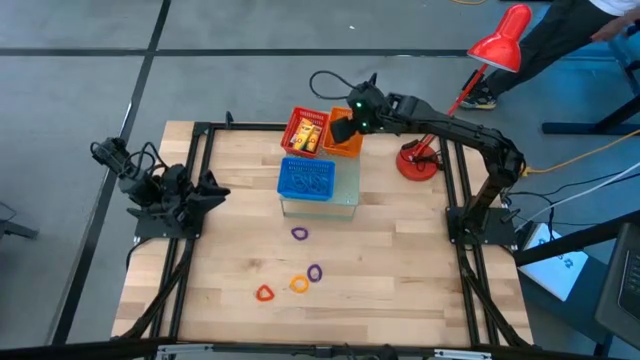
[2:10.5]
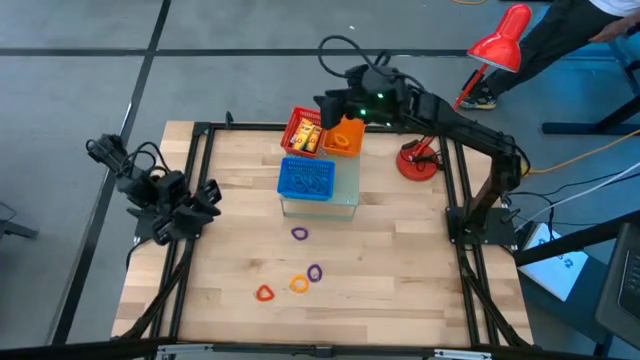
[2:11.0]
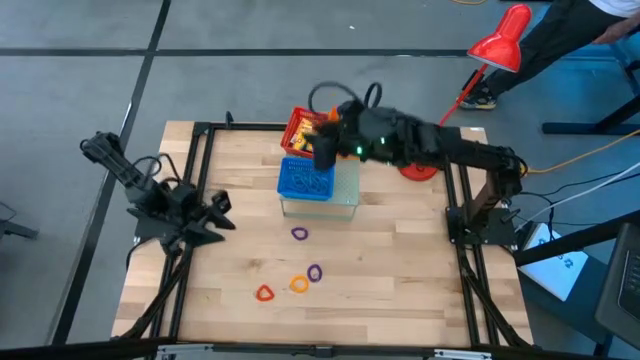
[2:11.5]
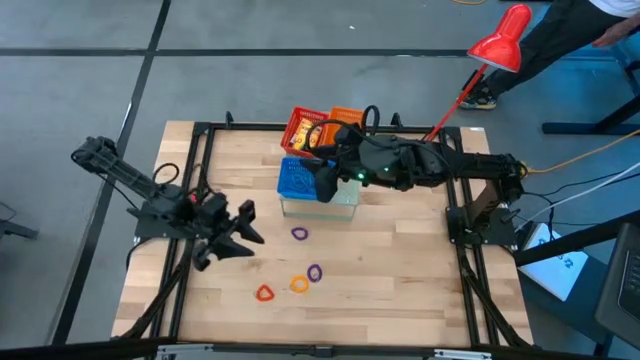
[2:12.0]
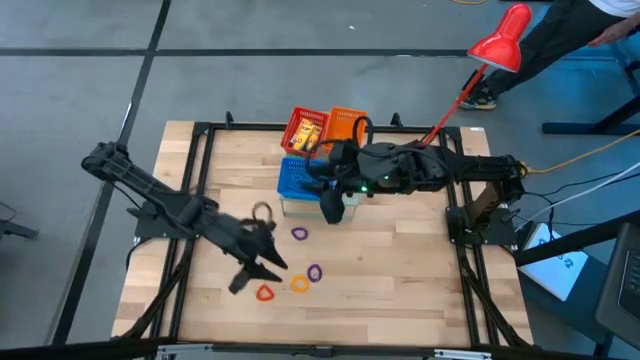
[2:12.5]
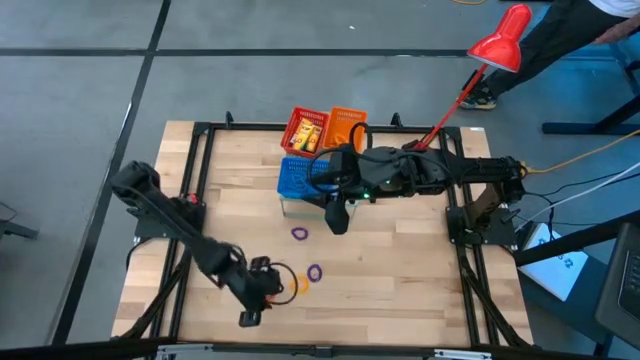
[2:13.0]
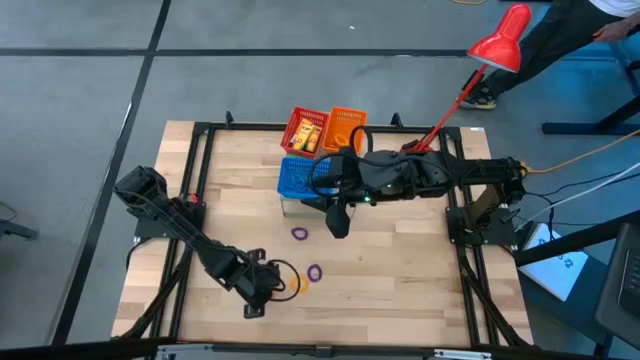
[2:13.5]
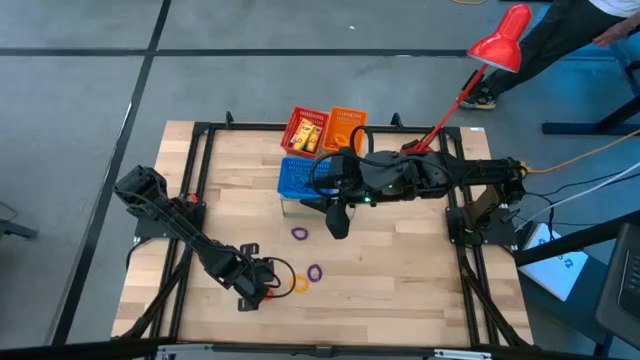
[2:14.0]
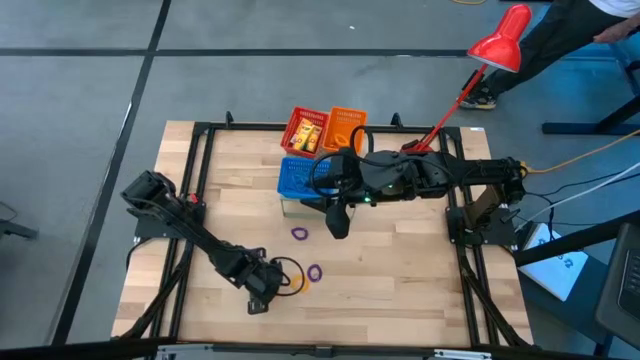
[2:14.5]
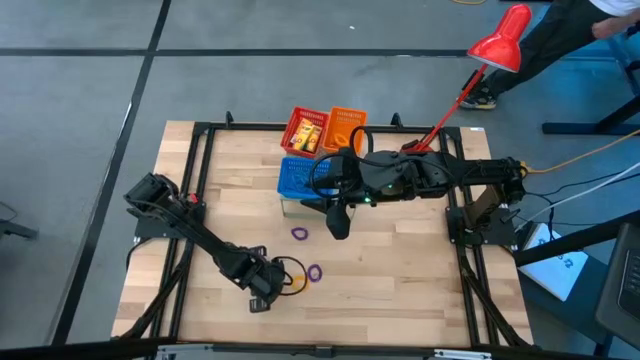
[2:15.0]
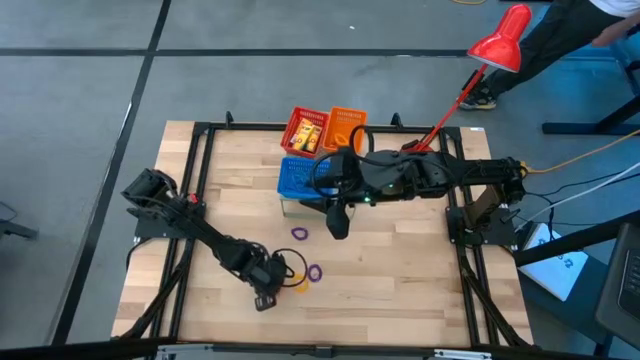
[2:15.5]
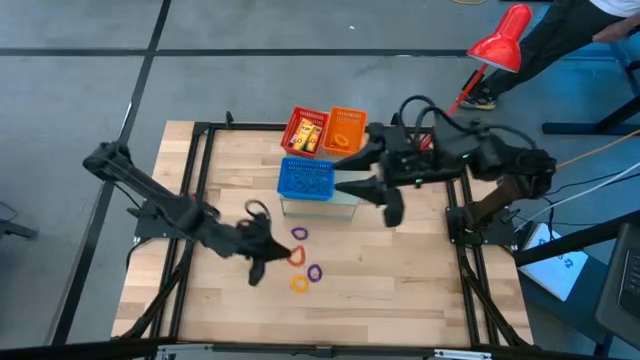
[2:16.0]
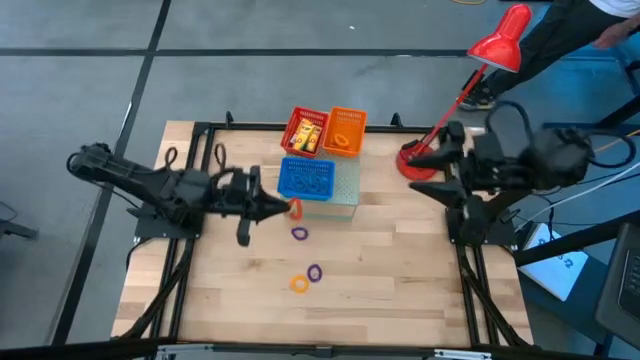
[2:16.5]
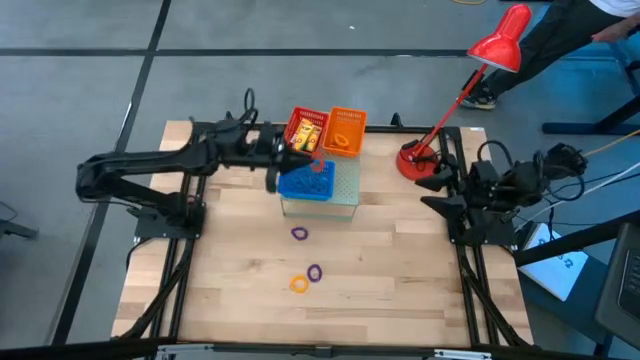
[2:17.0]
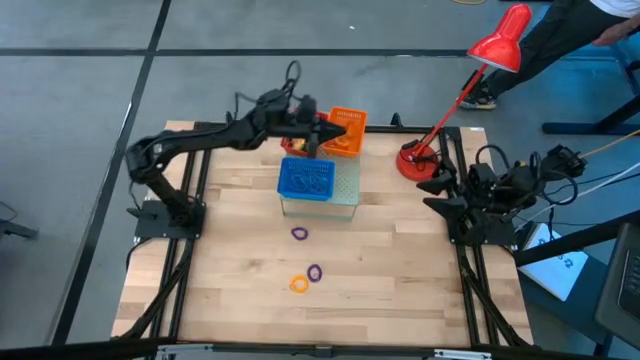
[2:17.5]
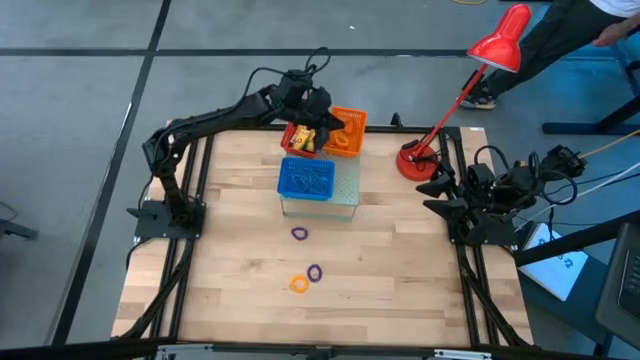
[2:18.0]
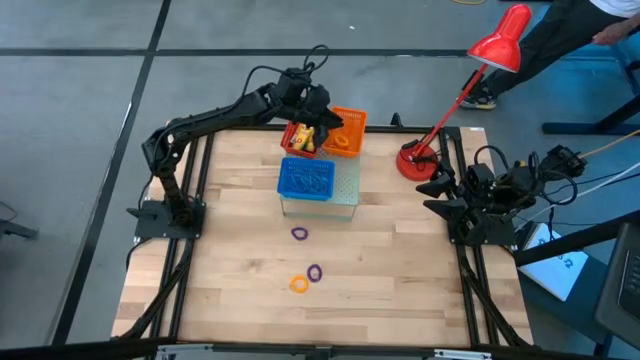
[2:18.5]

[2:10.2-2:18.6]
Task: Pick & Place Office Desk Supplies
Put the orange spring keychain into the orange basket on the shelf

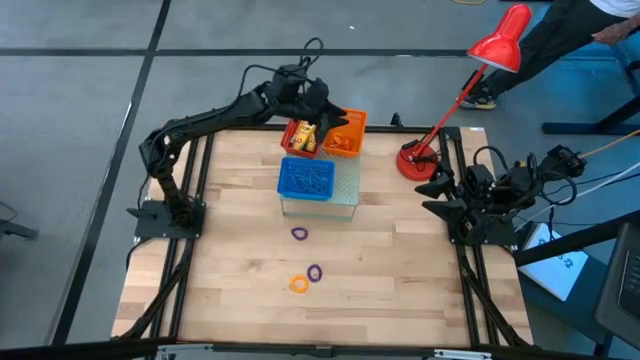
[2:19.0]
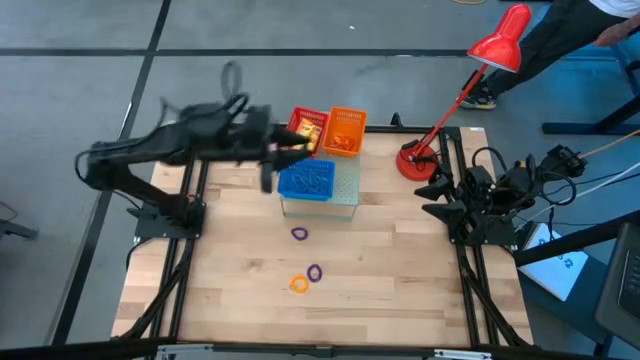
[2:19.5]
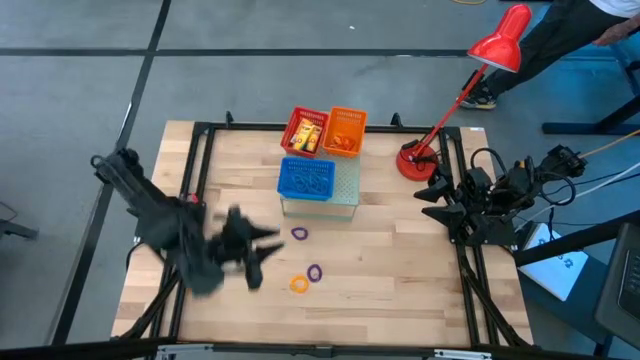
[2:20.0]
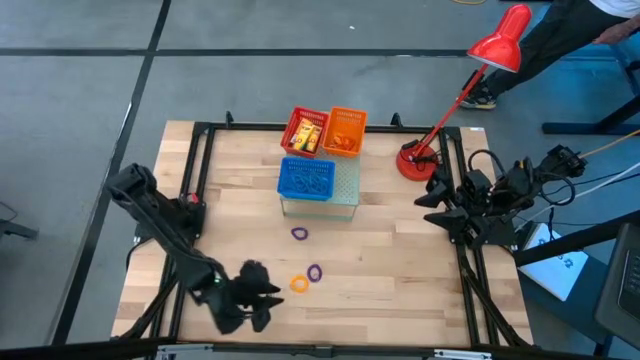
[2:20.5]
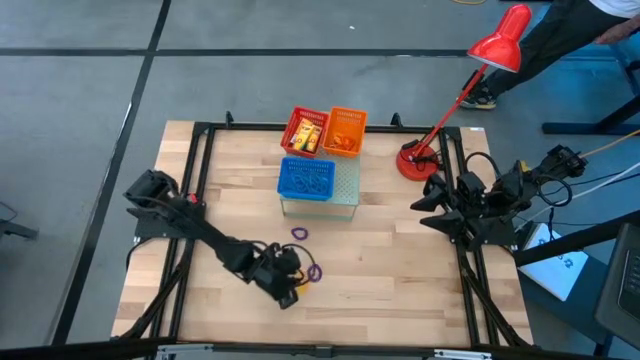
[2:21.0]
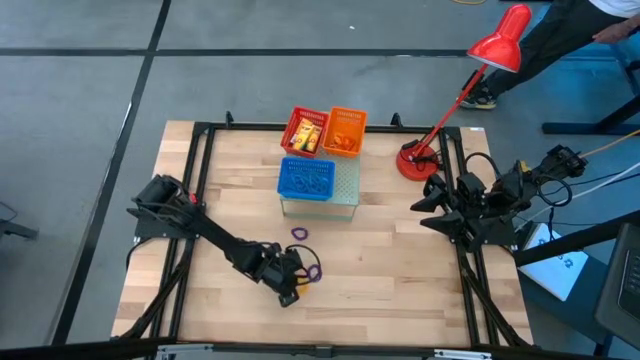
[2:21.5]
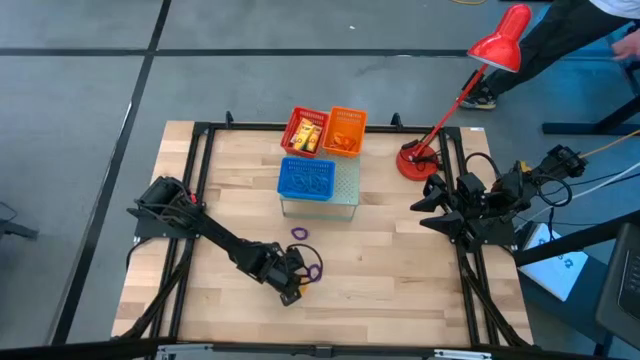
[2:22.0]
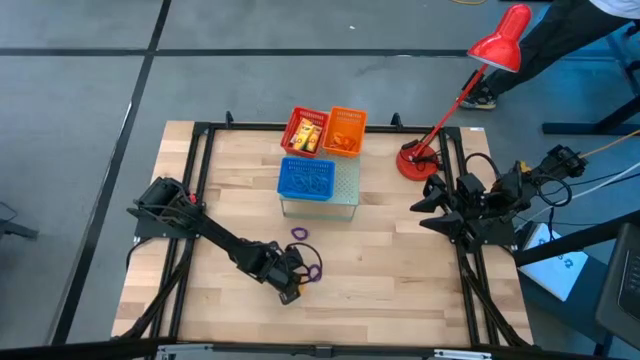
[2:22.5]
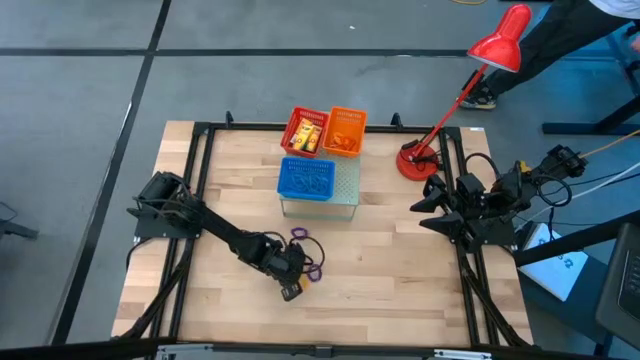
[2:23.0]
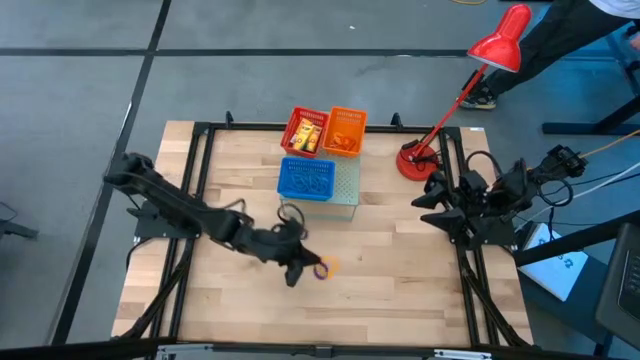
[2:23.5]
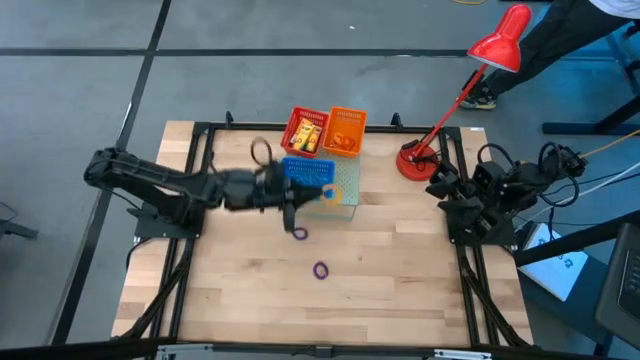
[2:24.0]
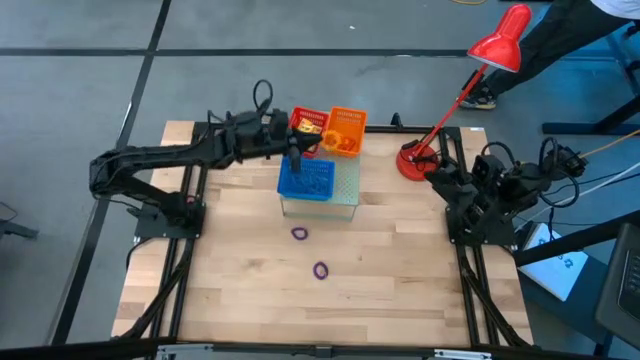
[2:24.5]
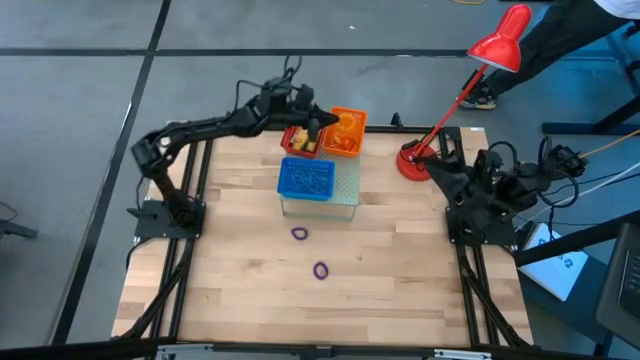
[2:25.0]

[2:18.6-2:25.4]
Put the yellow spring keychain into the orange basket on the shelf

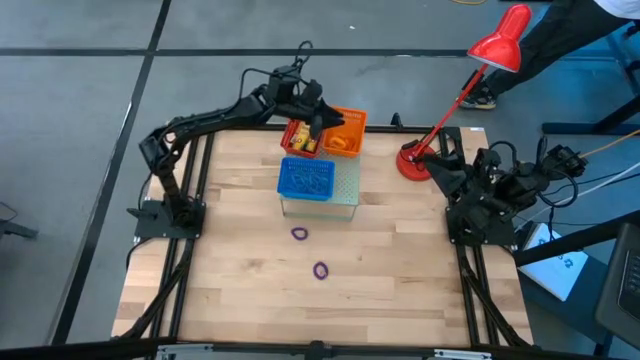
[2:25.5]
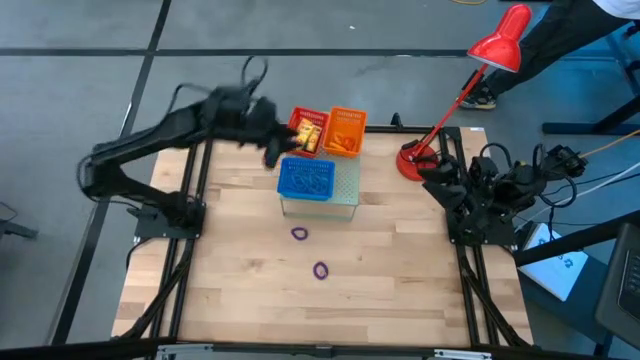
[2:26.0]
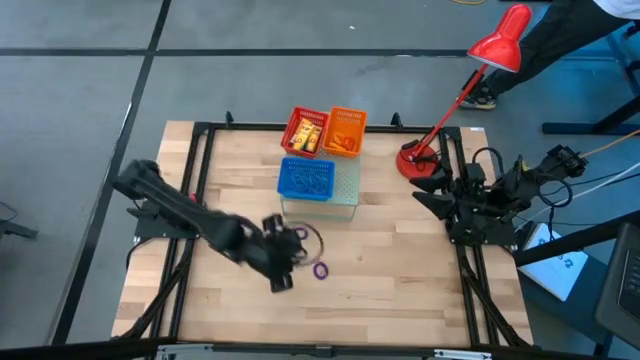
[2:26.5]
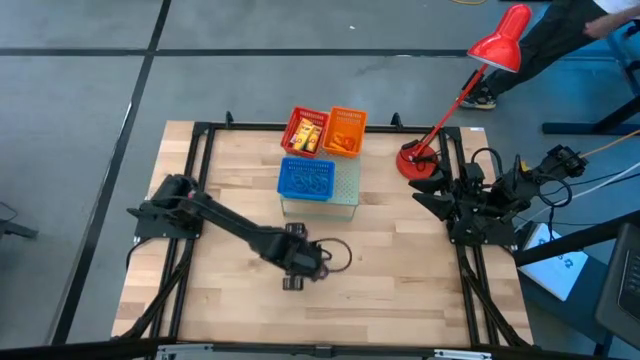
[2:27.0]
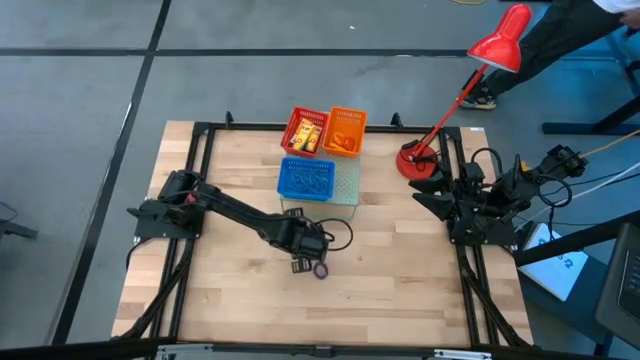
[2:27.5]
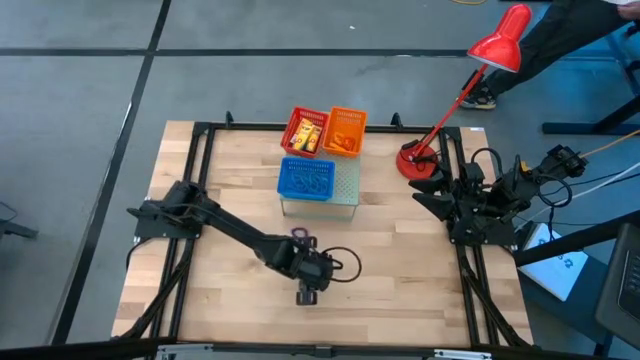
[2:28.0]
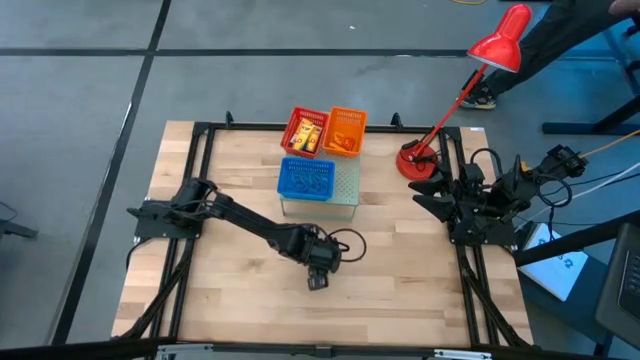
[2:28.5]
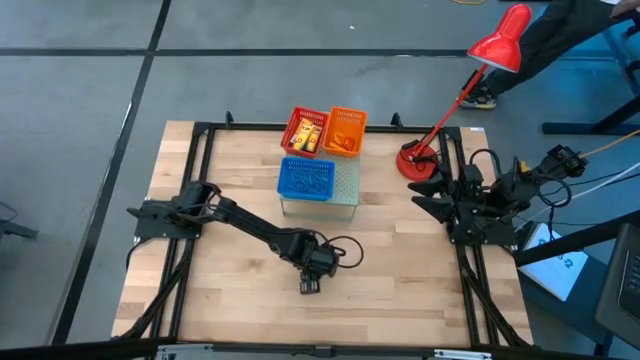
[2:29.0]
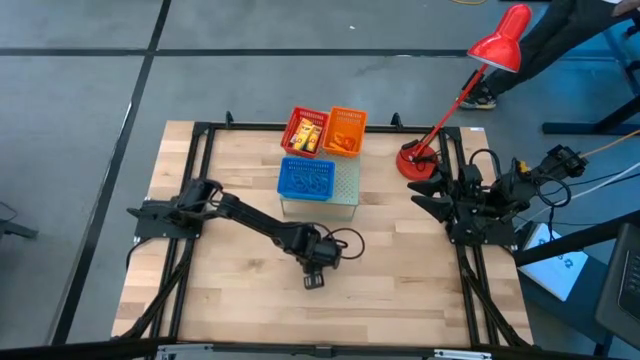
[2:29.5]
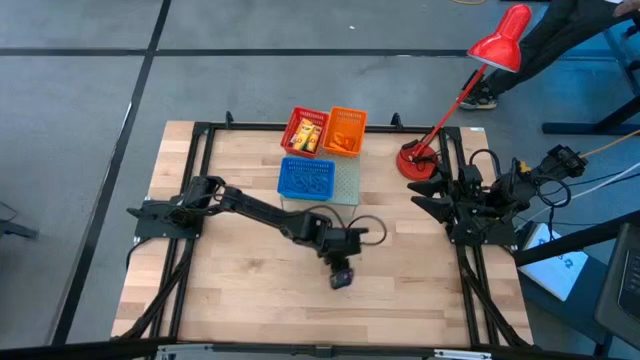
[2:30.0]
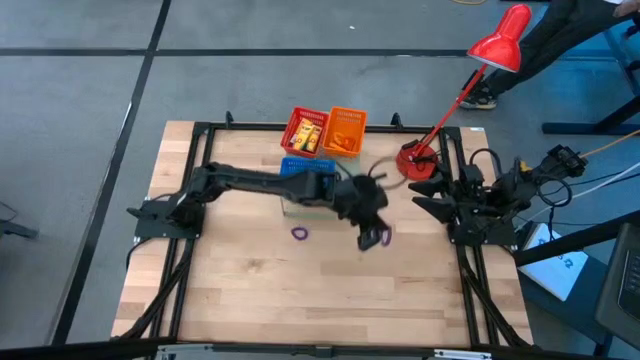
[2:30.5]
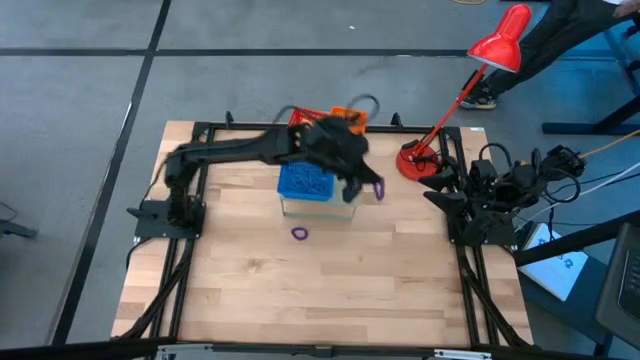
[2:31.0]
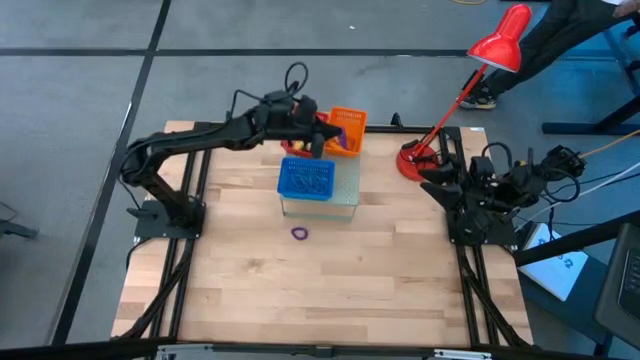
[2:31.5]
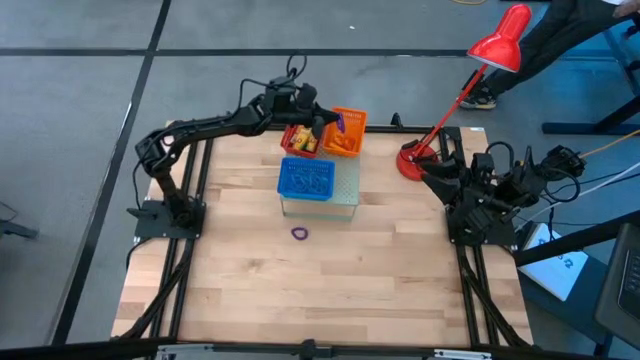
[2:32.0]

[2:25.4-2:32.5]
Put the violet spring keychain into the orange basket on the shelf
